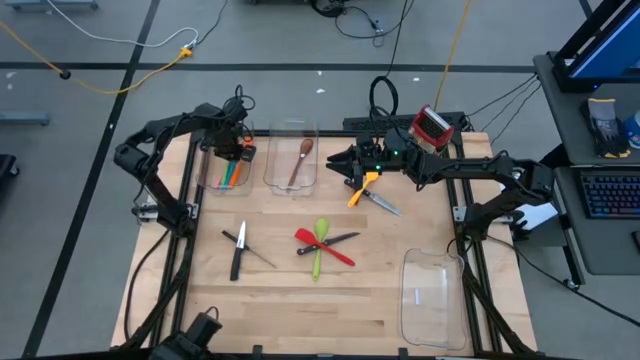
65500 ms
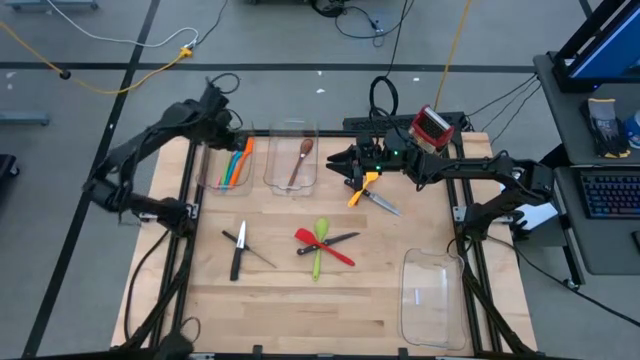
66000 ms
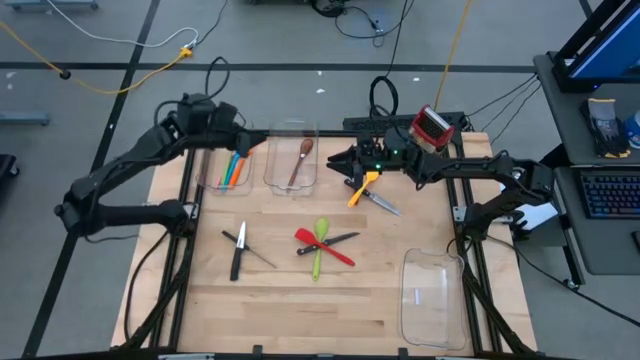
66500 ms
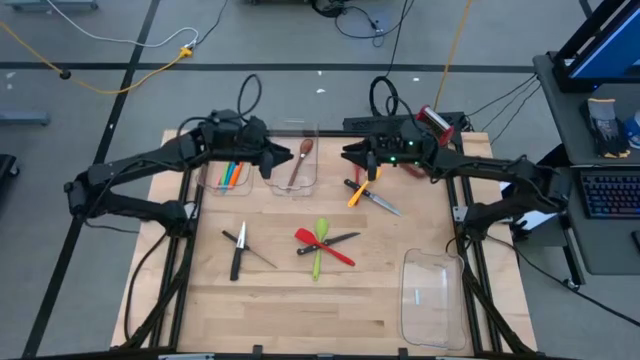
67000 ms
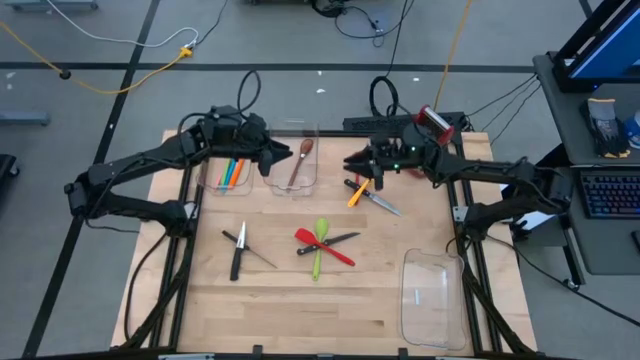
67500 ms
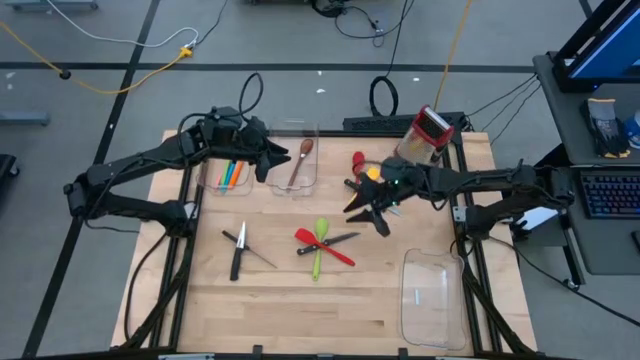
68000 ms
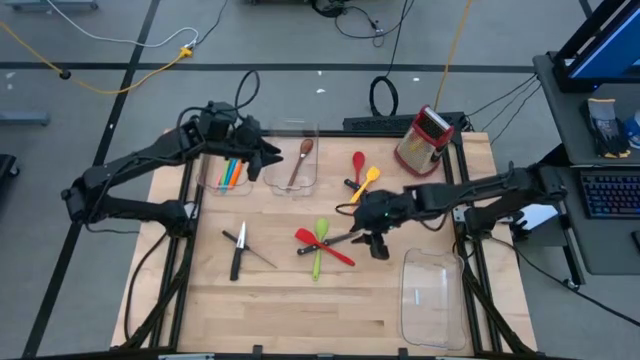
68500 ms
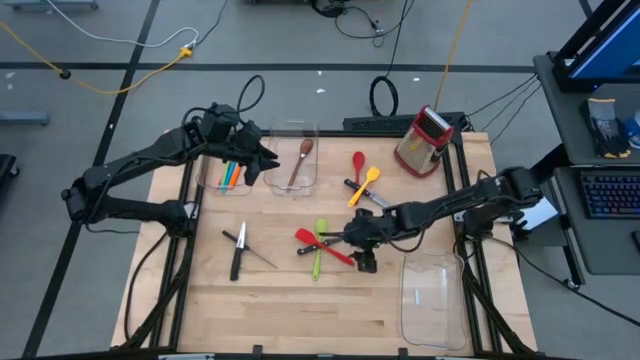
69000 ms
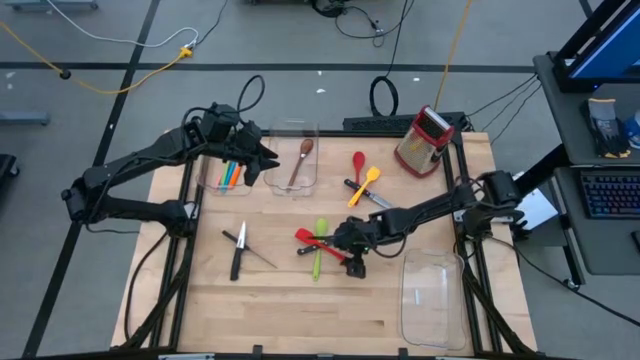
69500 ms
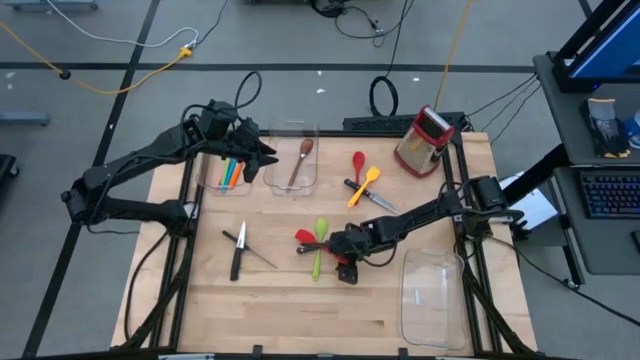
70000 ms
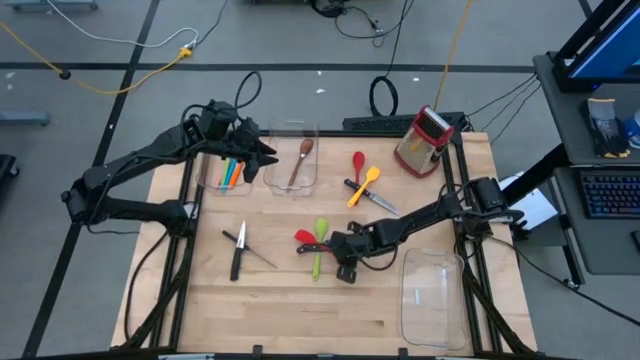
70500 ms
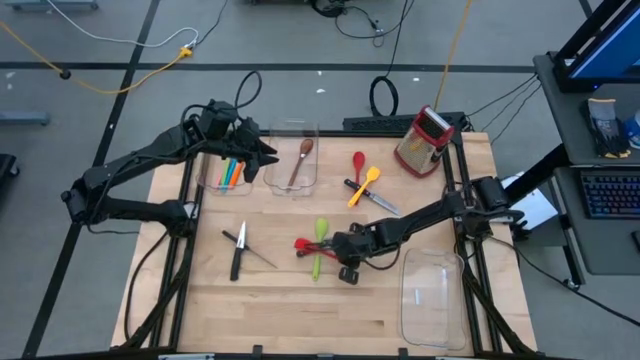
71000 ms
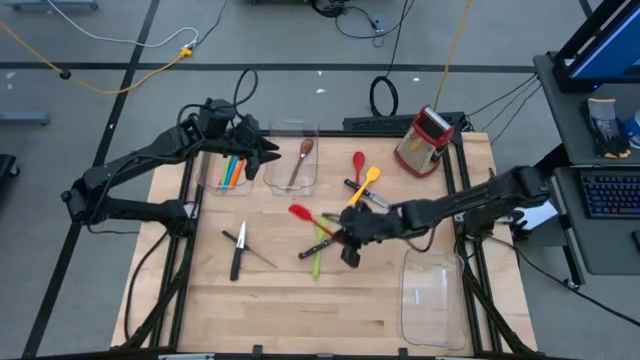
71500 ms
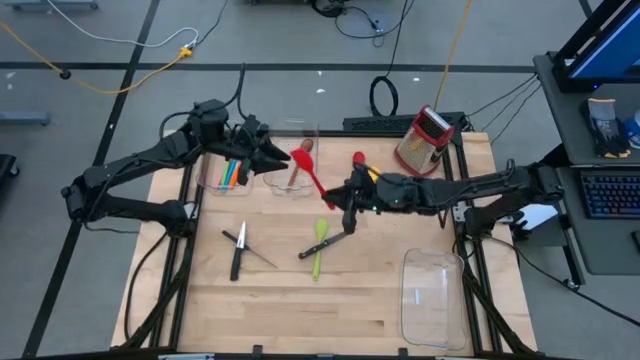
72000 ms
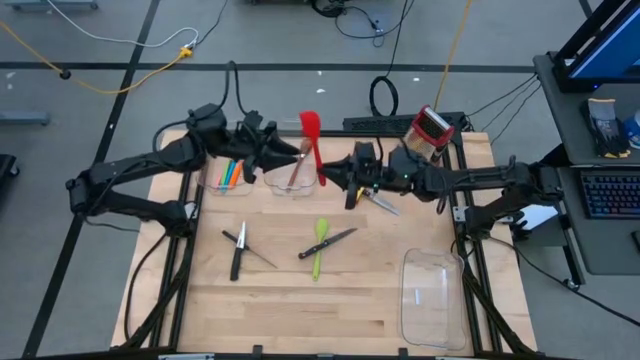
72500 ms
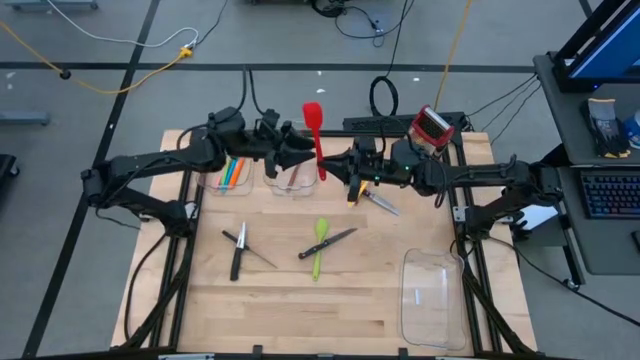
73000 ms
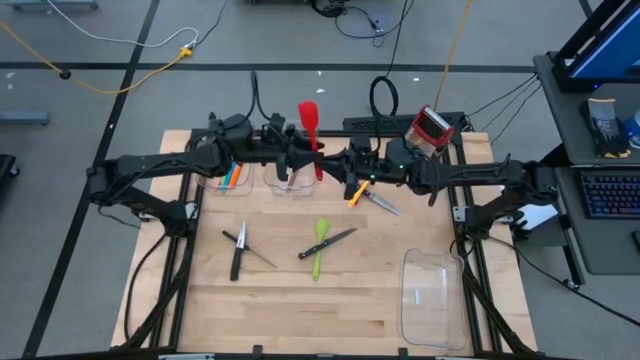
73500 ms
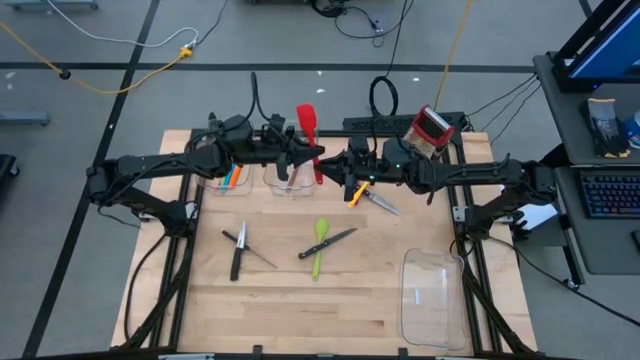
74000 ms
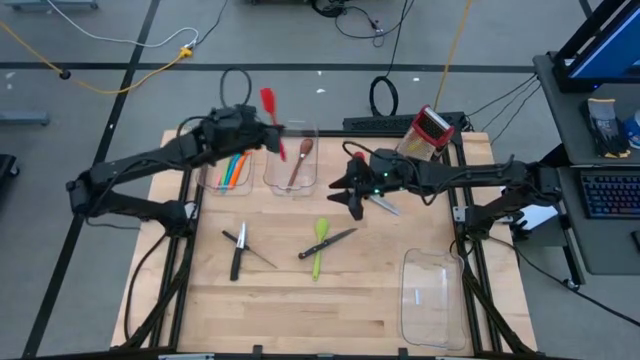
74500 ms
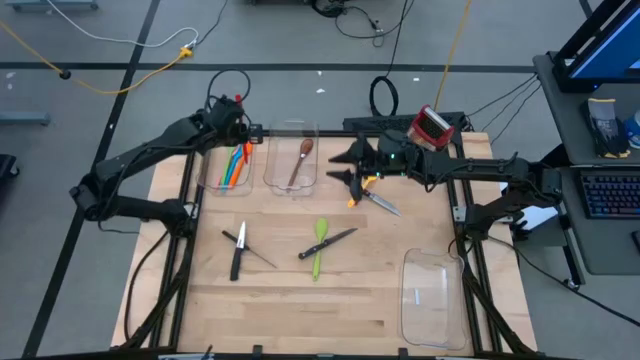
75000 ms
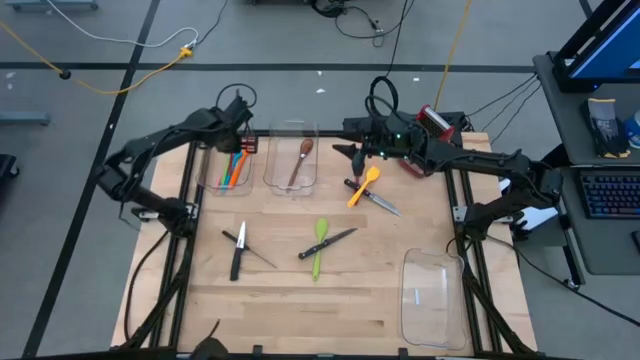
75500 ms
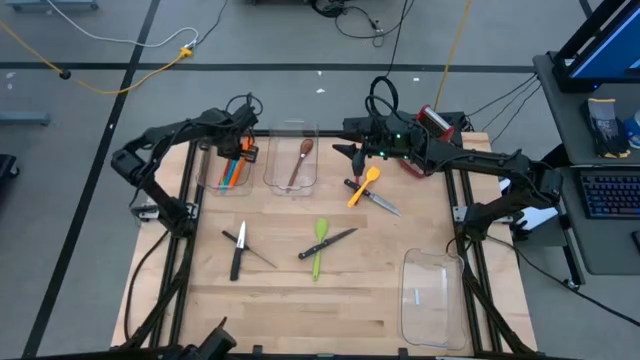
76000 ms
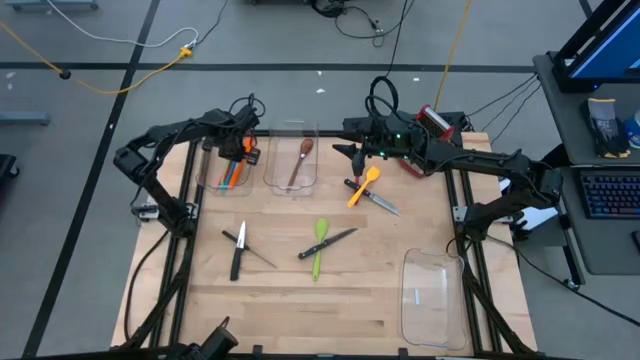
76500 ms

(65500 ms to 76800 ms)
Task: Pick & Place Kitchen Items
Put the red spatula into the left transparent bin

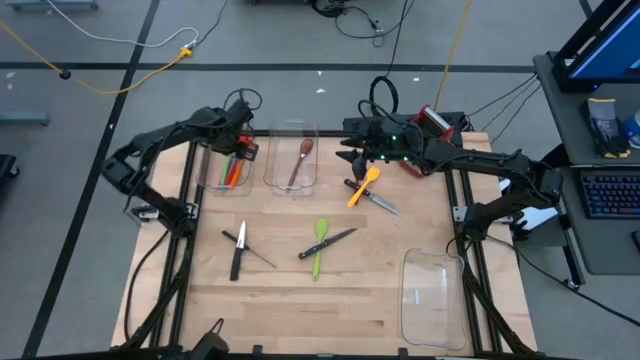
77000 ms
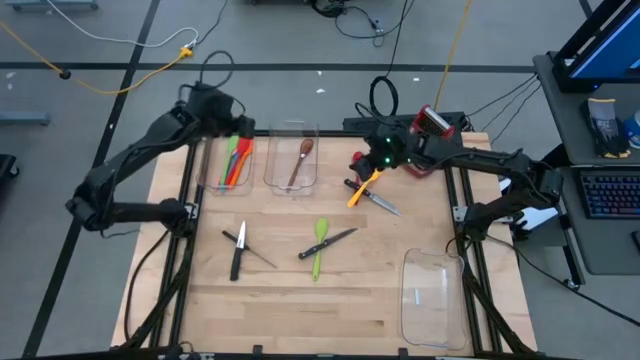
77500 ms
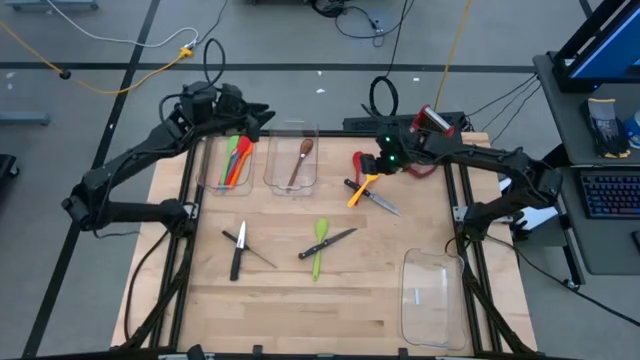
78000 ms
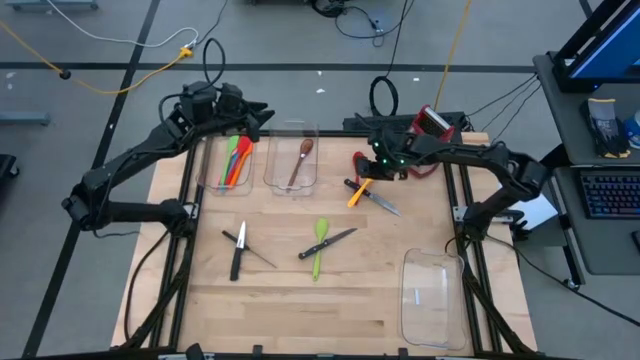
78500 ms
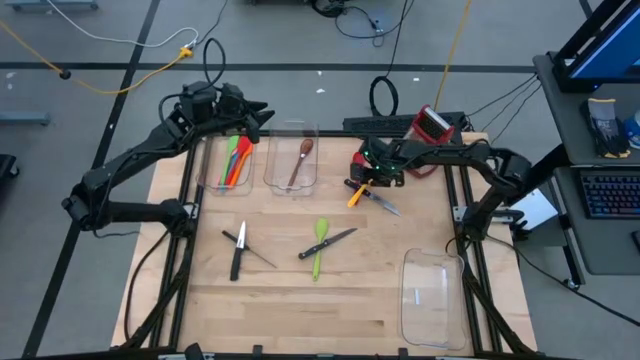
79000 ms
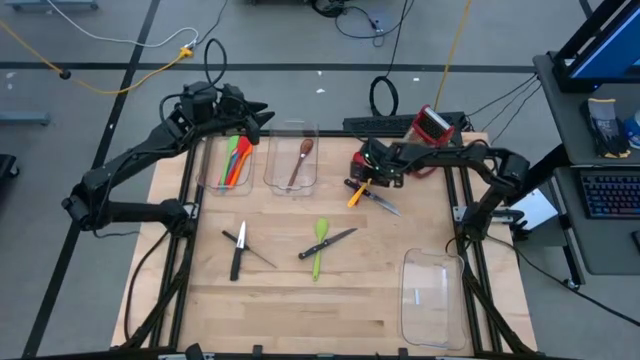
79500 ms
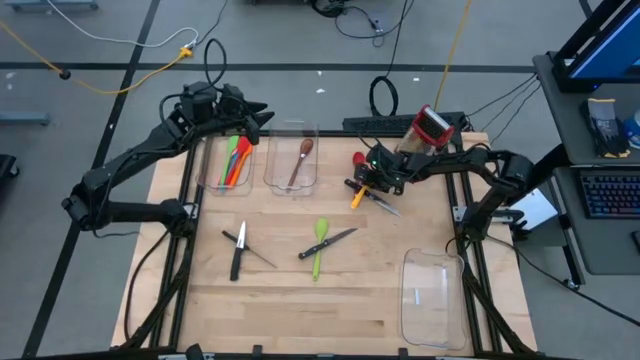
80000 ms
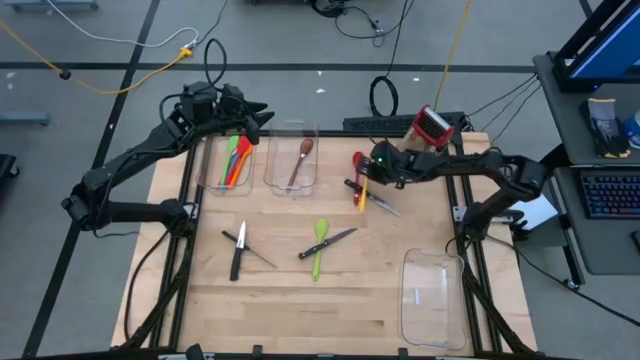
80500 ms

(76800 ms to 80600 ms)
Put the yellow spatula into the top left trans parent bin

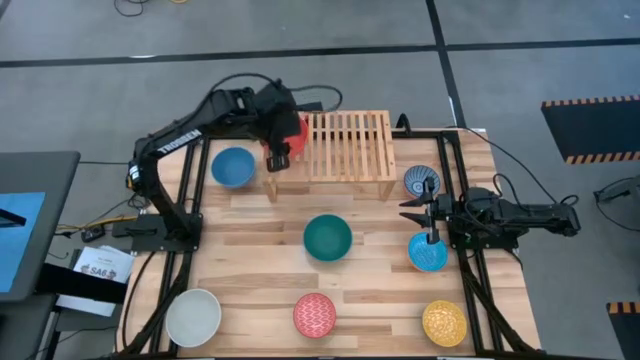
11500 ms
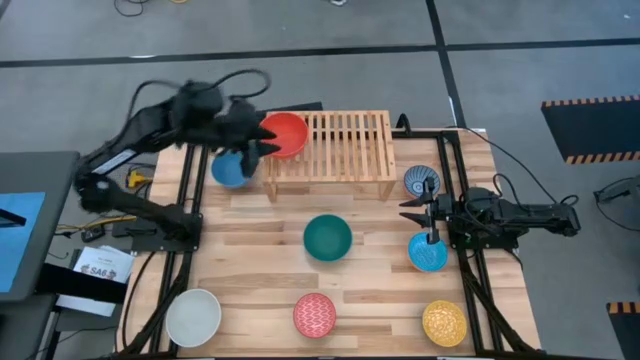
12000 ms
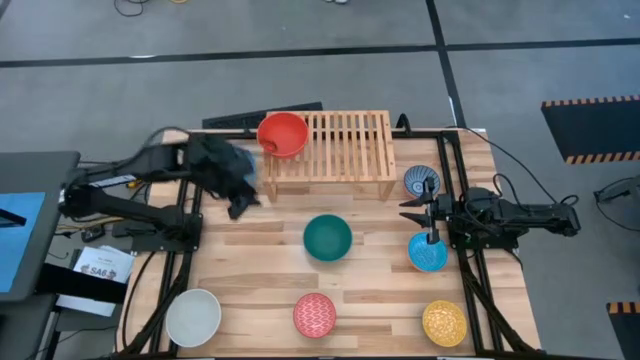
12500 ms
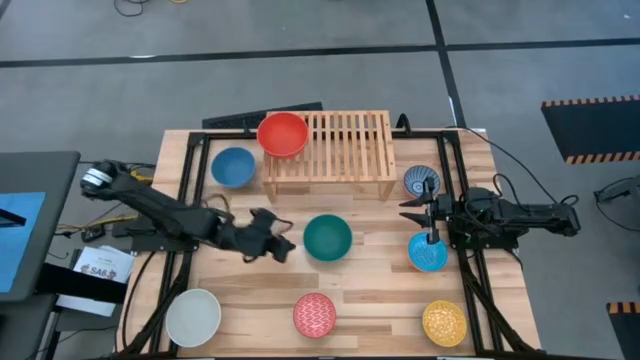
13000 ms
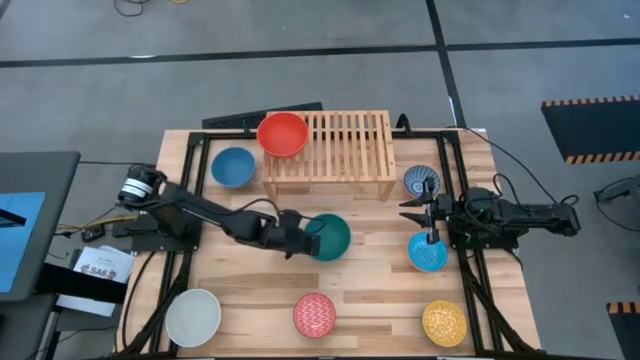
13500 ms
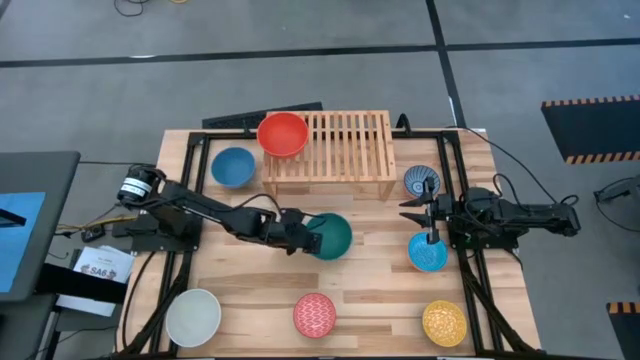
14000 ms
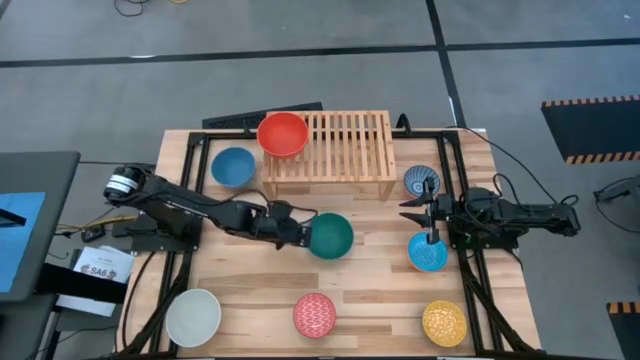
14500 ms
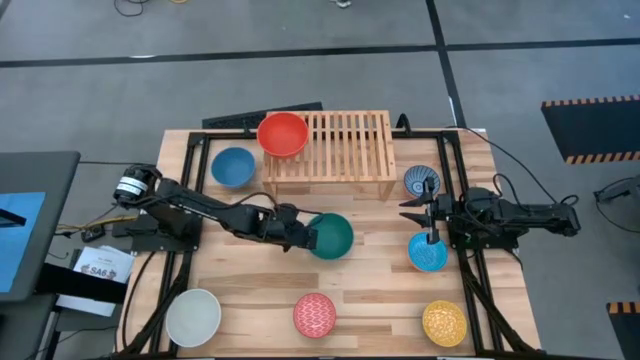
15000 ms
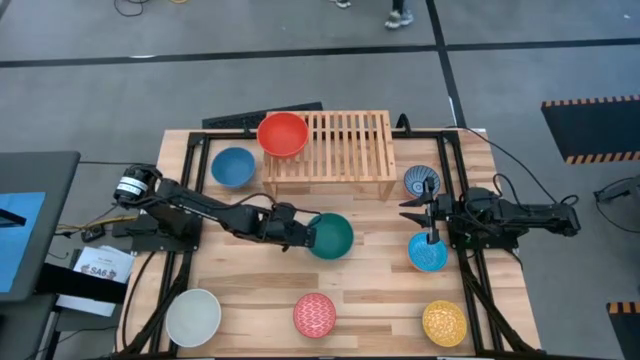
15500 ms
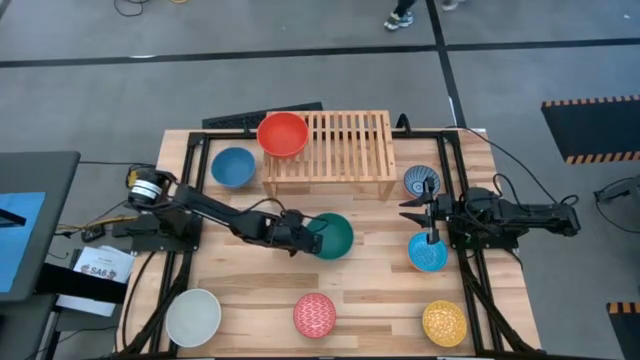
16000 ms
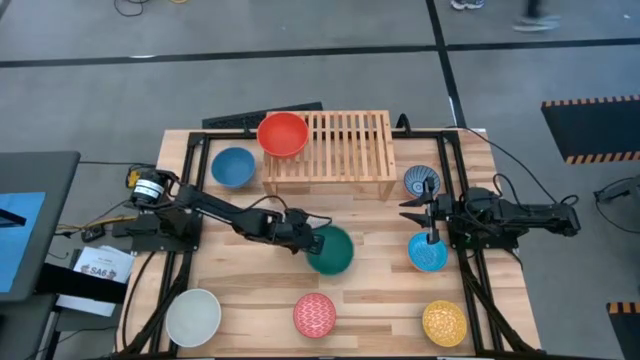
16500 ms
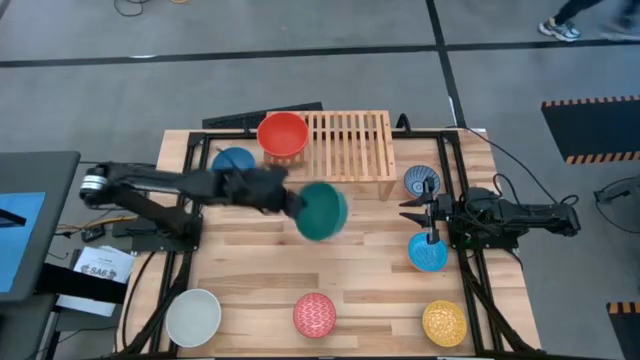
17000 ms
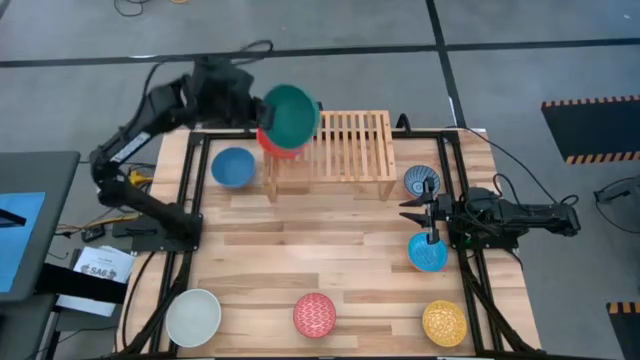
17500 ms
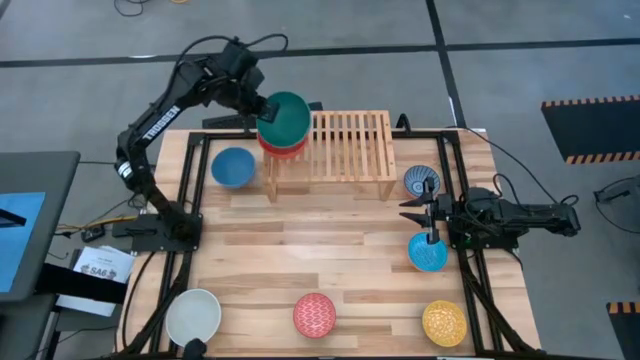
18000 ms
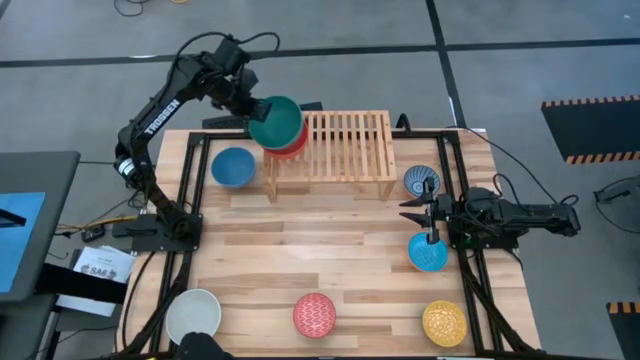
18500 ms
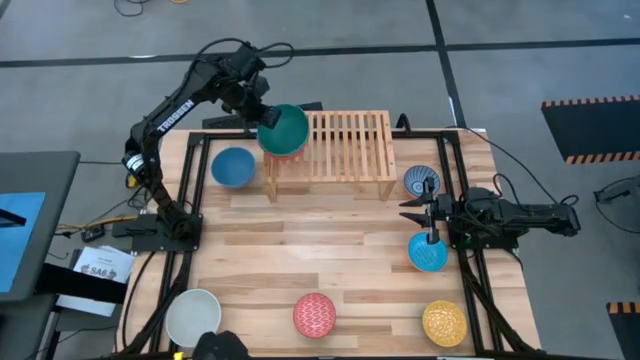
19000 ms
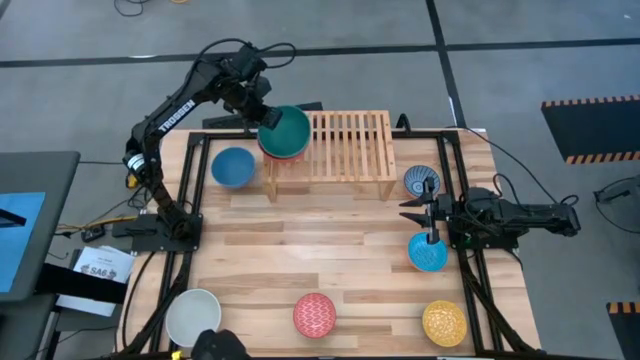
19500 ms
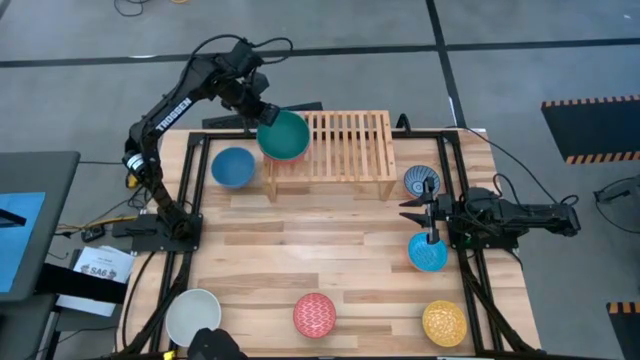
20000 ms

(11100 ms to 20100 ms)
Task: Place and stack bowls onto a shelf
Stack the large green bowl on top of the large orange bowl on the shelf
